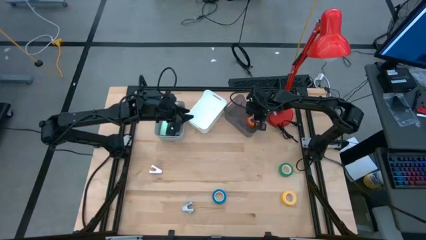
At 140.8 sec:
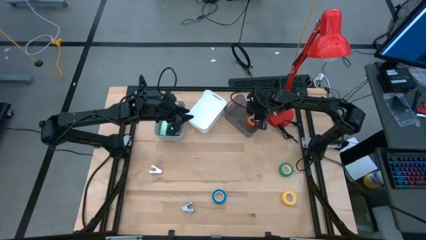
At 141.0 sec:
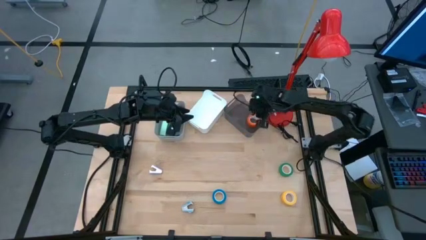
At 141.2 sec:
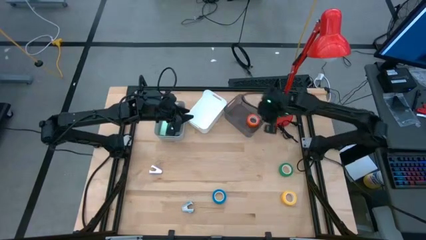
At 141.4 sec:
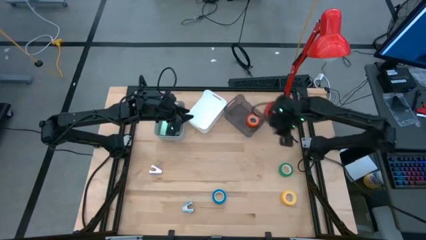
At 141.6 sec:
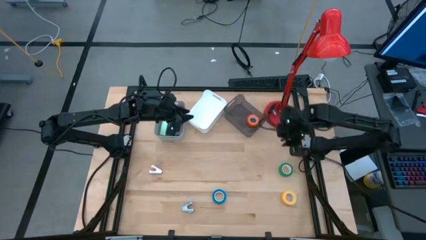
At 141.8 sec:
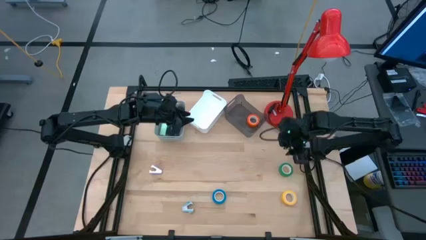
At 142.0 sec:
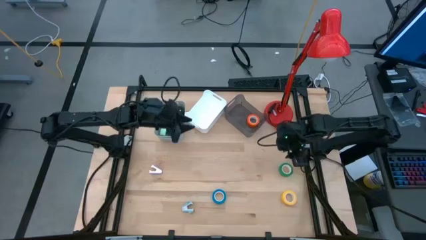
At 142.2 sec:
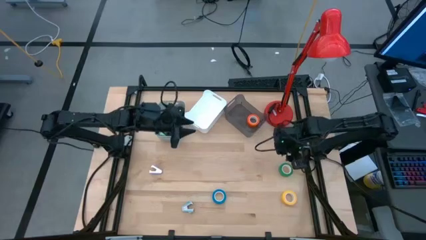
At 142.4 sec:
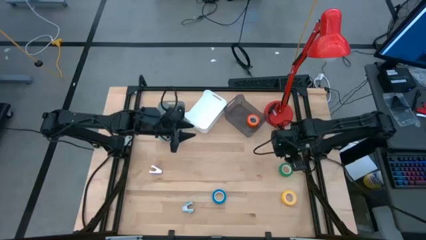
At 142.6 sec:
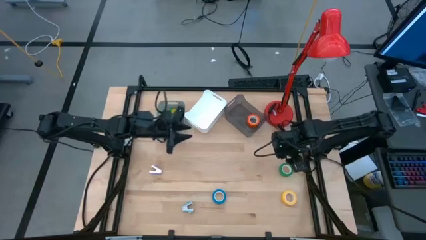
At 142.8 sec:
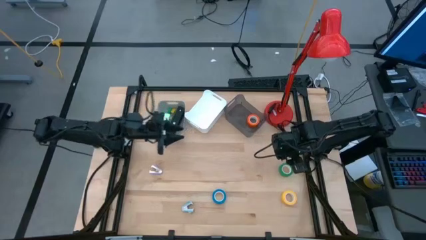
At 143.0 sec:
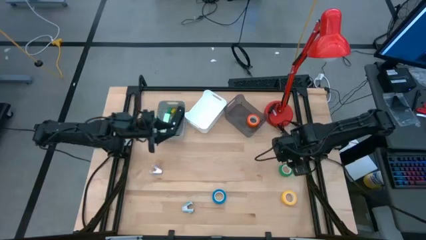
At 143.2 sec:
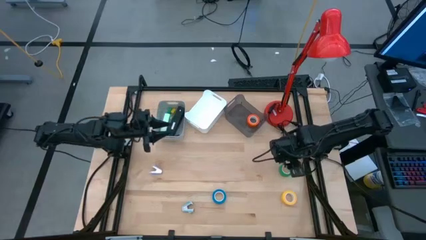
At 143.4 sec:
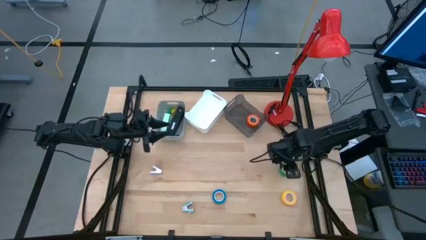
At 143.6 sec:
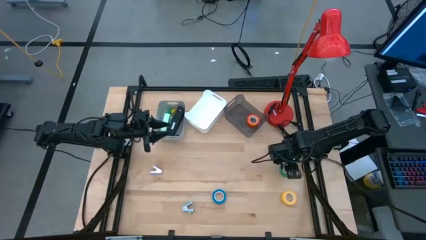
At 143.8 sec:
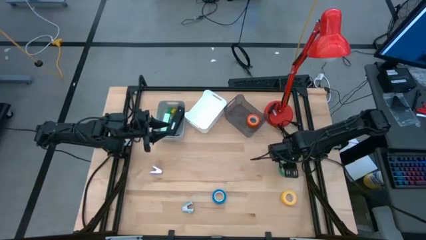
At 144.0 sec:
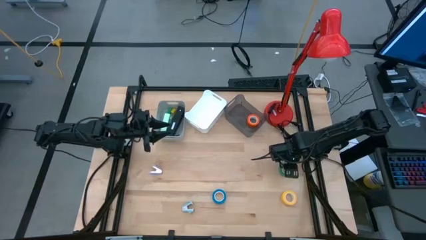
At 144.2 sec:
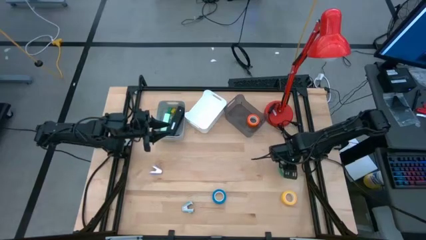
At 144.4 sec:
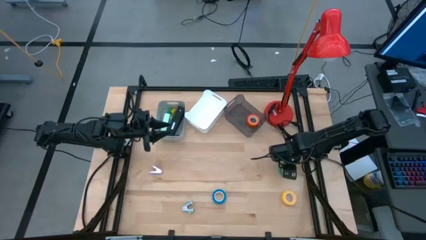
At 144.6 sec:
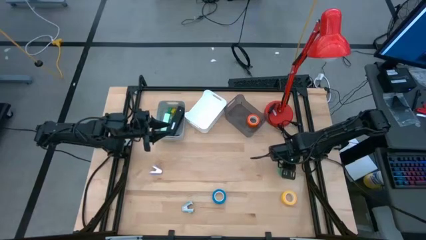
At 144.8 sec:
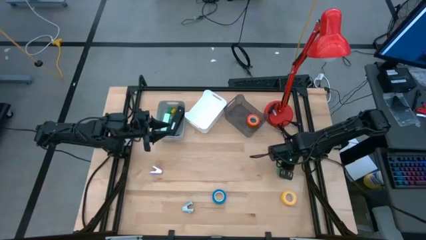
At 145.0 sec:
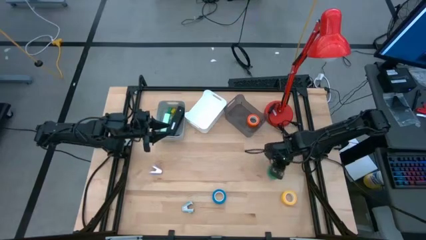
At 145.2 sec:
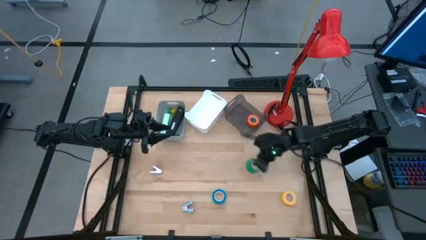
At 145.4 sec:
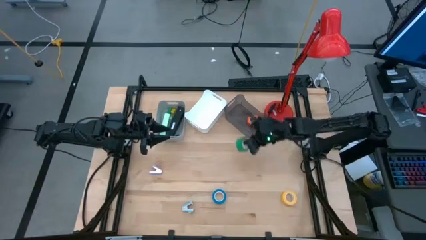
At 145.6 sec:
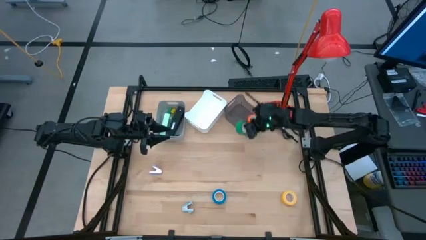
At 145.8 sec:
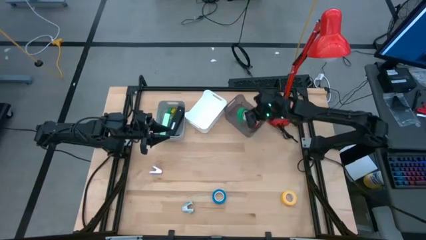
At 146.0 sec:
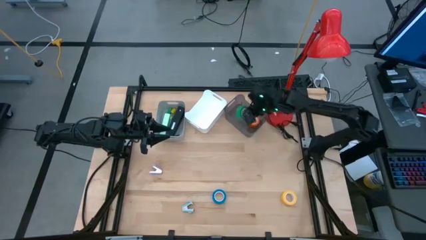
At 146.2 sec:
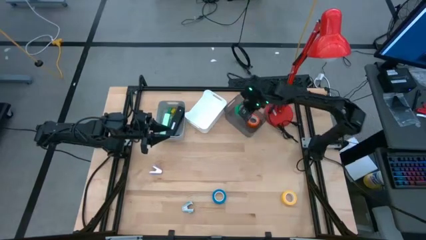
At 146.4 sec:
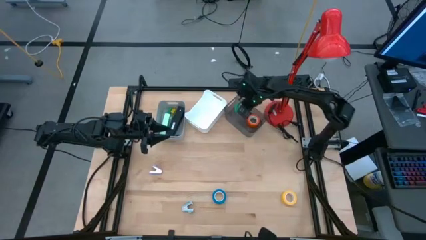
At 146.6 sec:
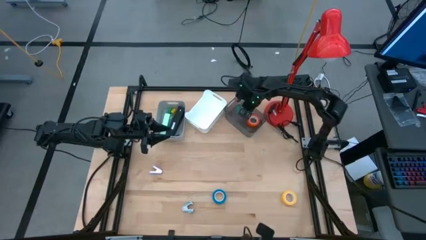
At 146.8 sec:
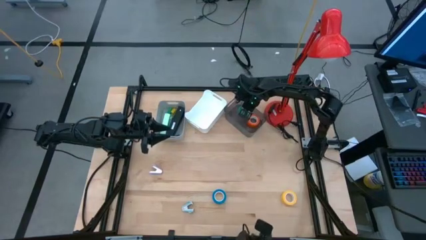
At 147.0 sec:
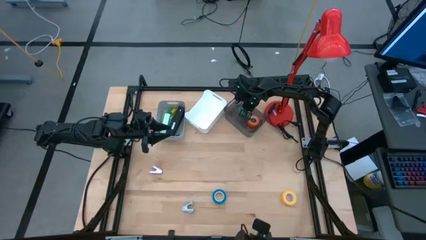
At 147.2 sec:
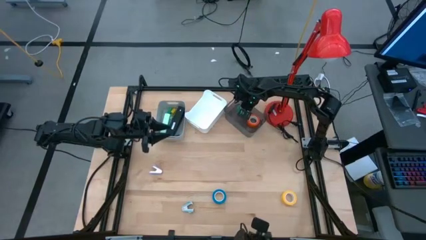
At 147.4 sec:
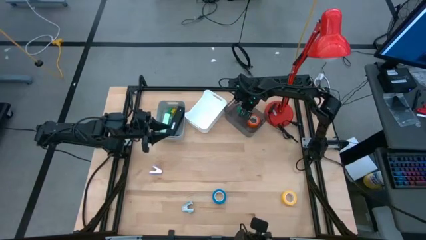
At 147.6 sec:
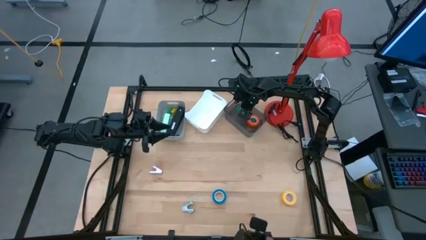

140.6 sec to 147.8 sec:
Task: Pick and place Stapler, Stapler remover, tape
Put the green tape into the black bin

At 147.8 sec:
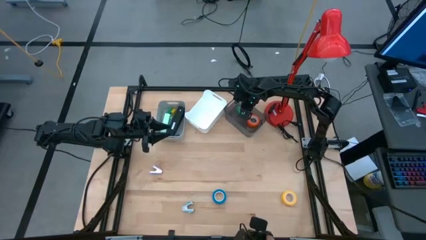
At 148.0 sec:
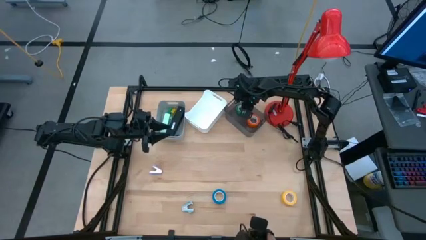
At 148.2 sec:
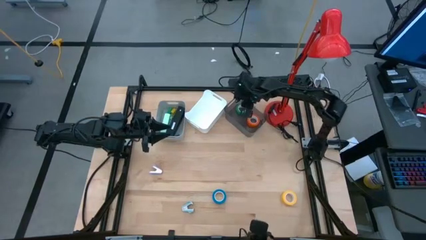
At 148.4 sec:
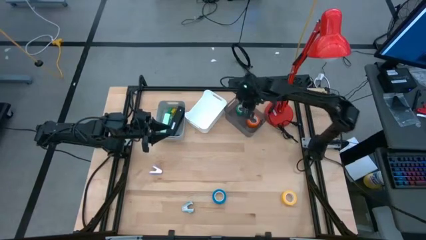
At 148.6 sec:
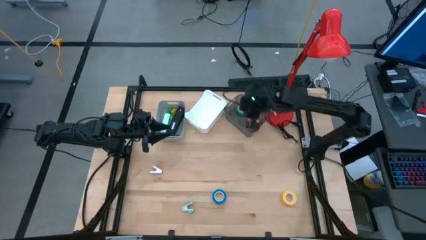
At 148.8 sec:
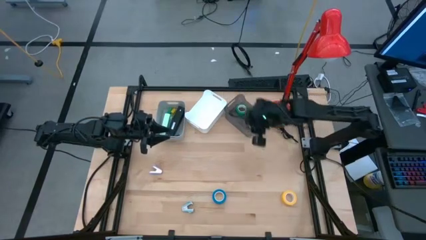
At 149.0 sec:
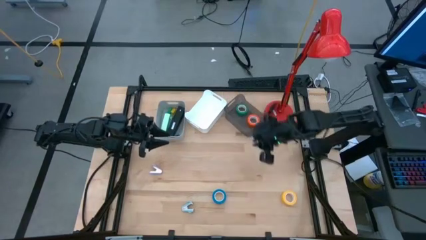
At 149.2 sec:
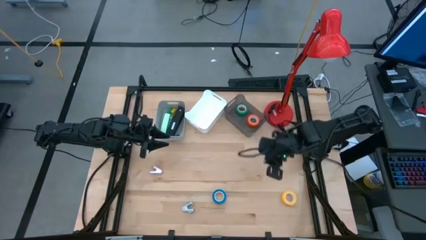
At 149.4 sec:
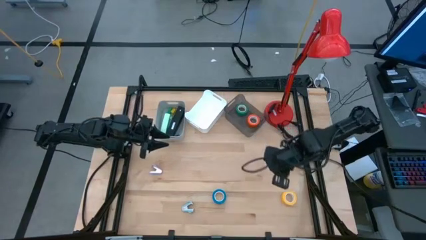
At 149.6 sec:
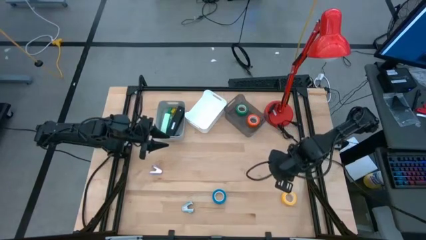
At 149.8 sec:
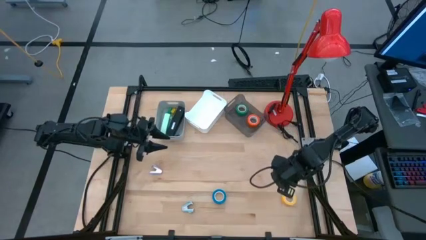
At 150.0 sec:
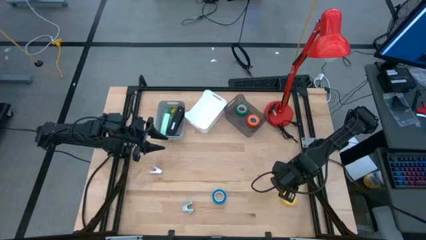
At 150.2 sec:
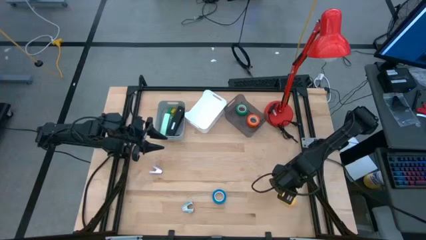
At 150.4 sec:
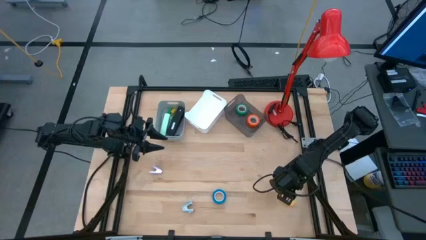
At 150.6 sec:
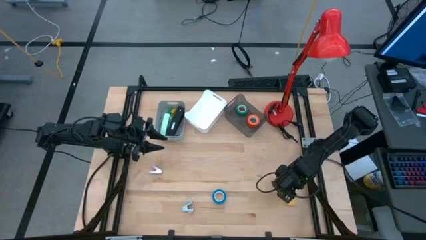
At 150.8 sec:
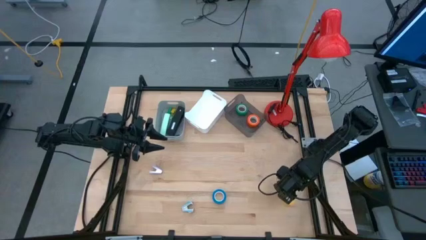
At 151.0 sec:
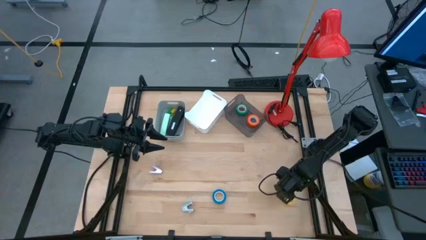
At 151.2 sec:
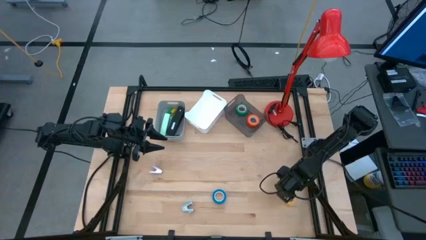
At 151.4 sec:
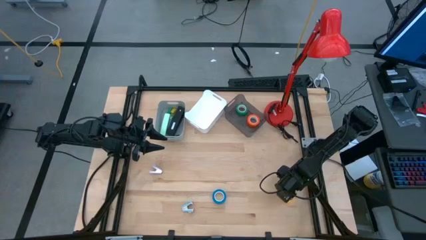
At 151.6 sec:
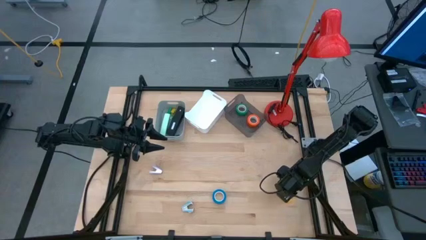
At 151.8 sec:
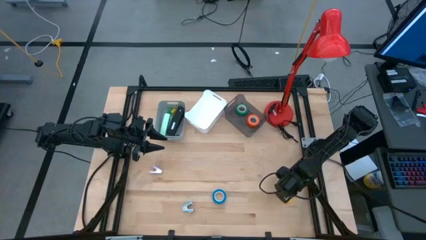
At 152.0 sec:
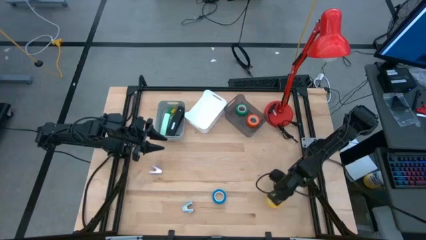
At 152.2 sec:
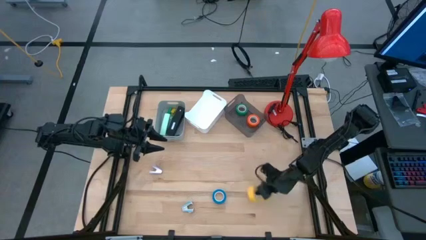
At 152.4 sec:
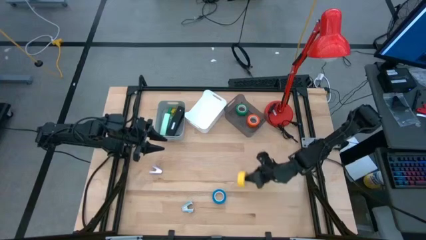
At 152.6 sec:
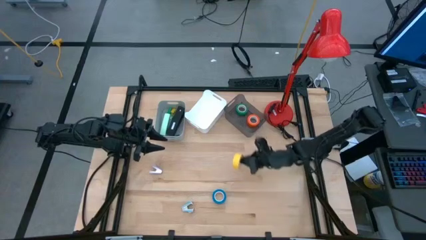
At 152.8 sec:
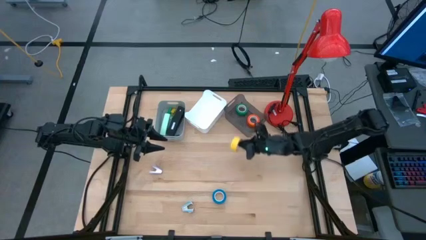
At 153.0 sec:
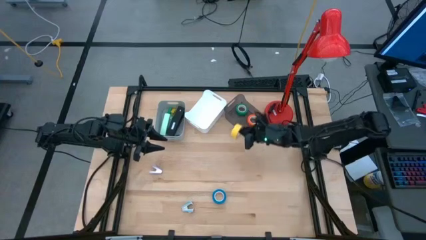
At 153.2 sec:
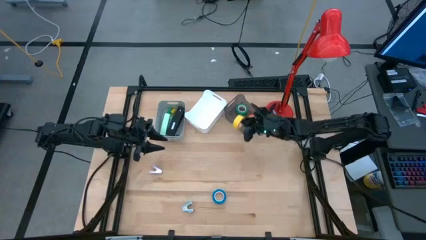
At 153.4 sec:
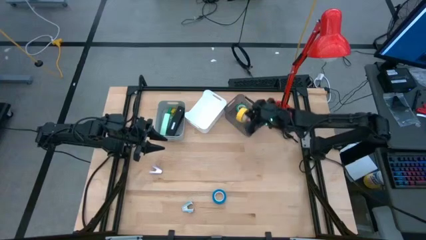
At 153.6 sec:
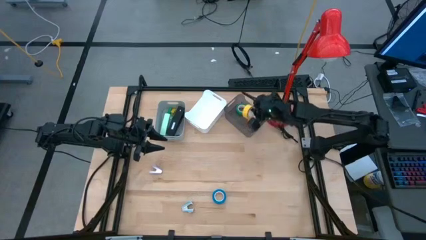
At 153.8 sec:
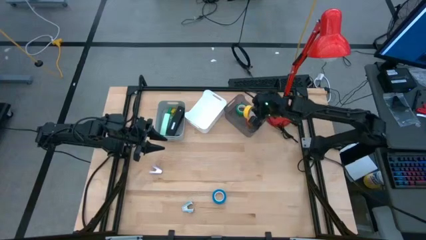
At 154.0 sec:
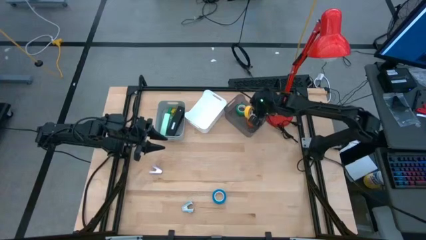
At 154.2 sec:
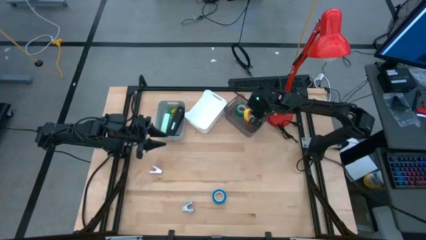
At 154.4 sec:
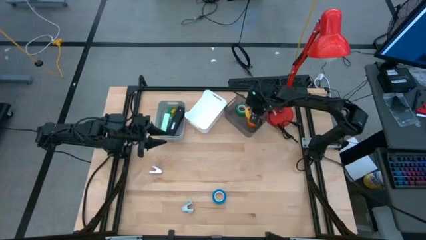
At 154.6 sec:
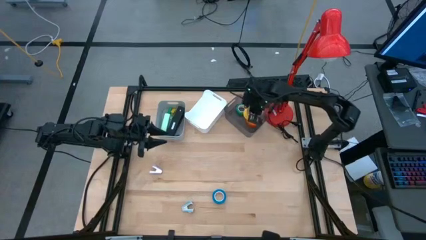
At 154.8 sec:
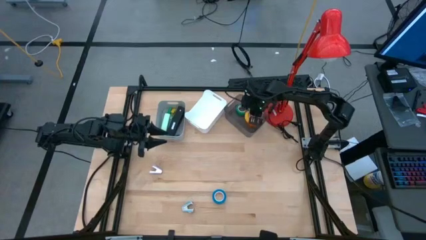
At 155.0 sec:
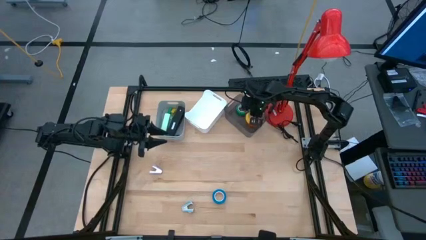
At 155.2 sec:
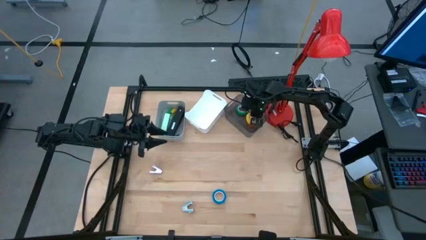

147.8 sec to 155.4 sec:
Put the yellow tape into the black bin
